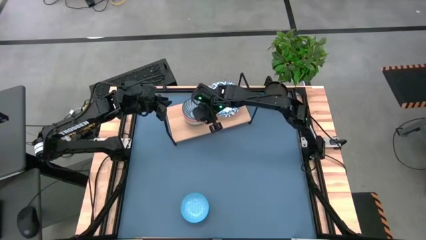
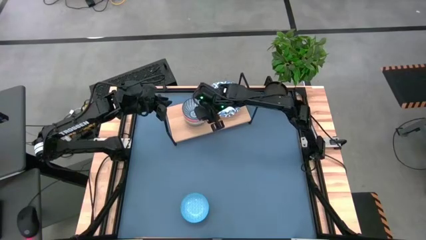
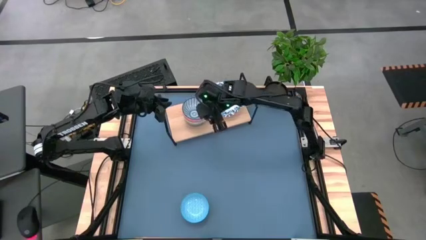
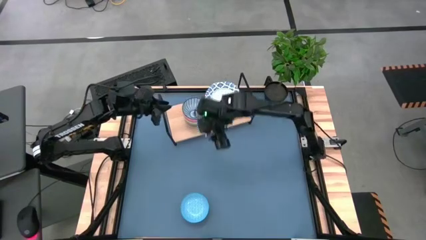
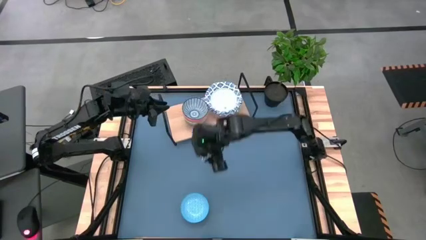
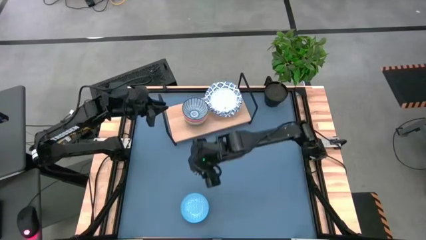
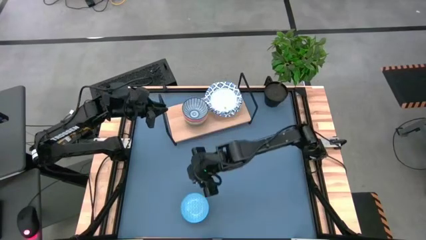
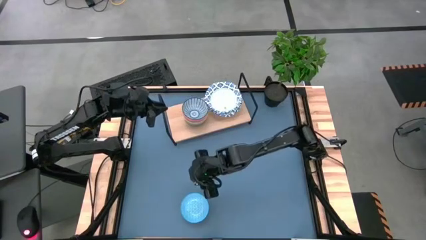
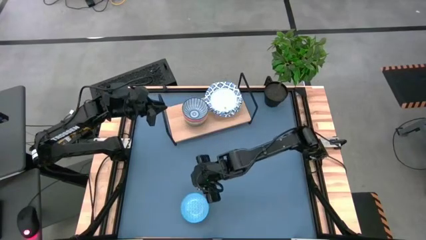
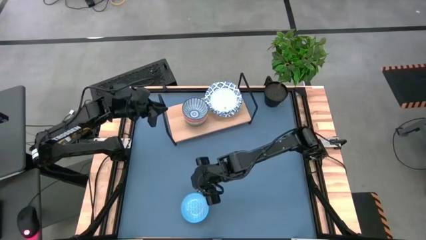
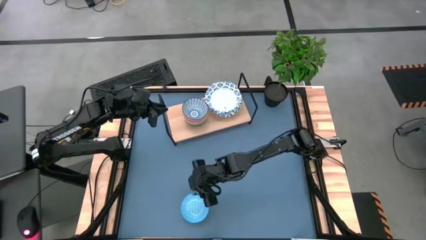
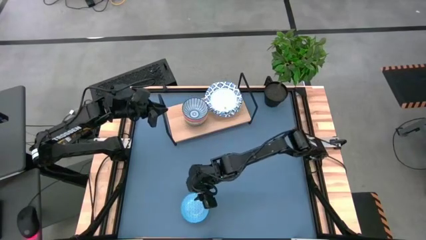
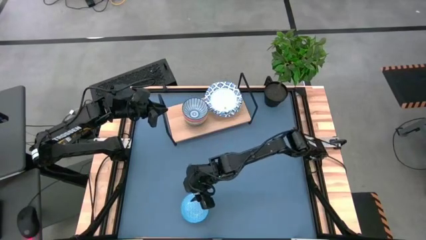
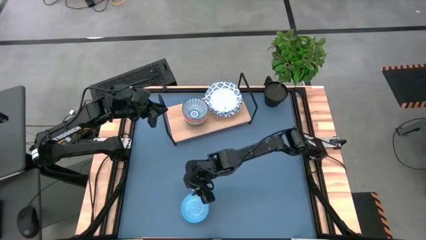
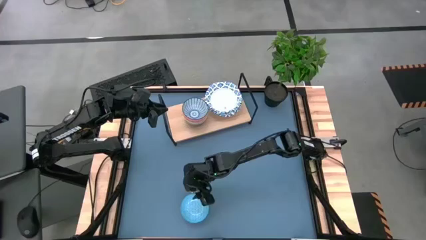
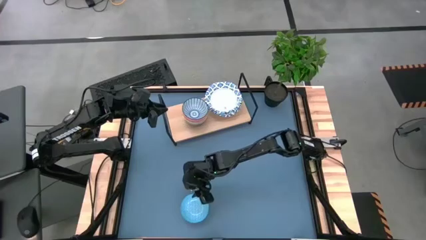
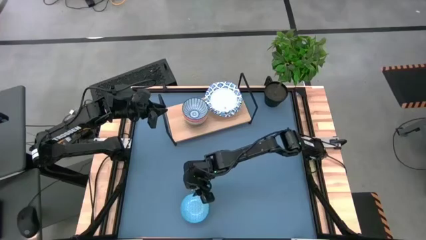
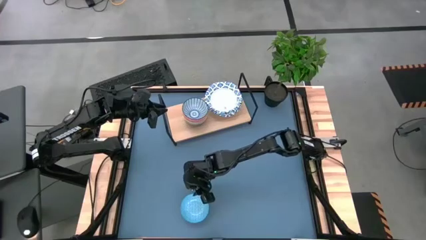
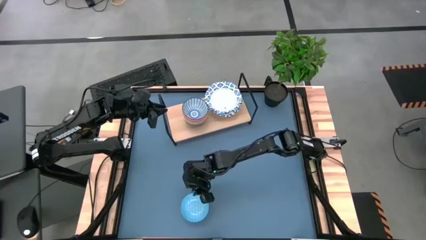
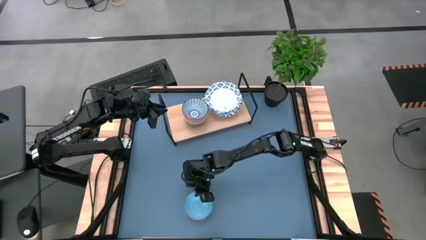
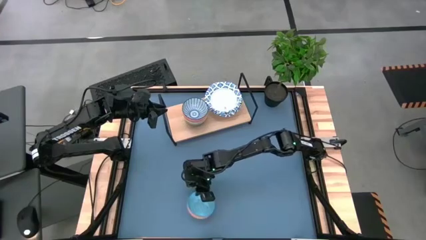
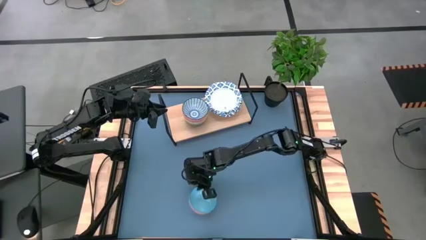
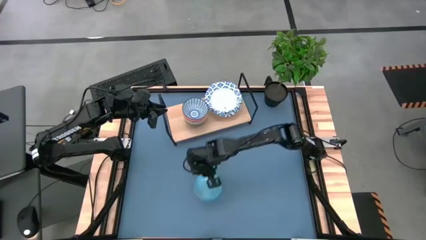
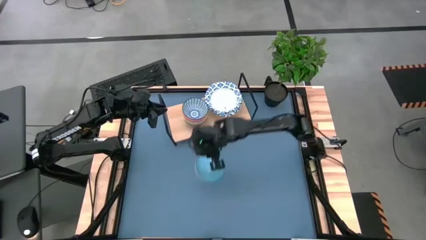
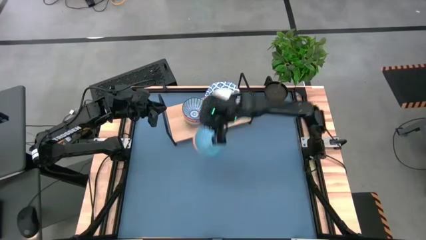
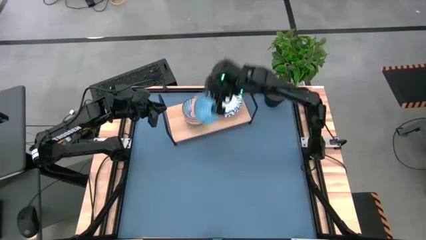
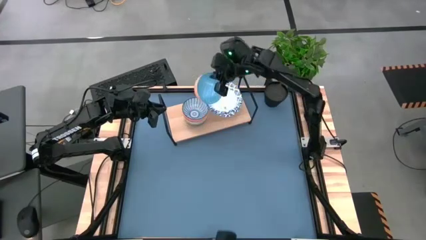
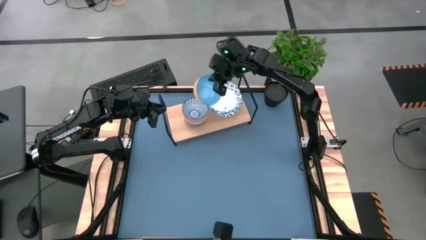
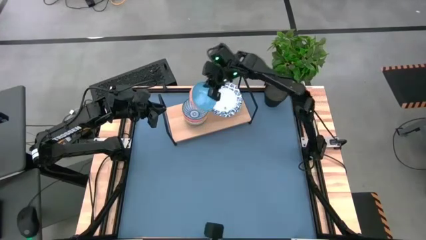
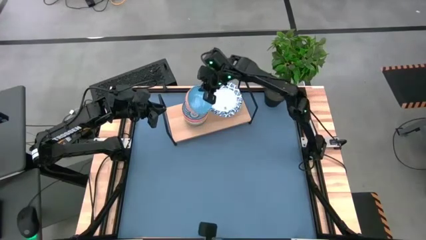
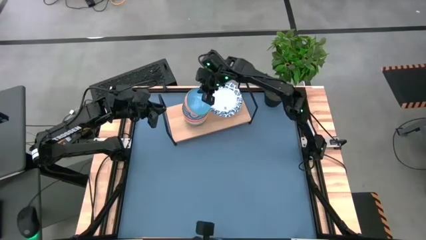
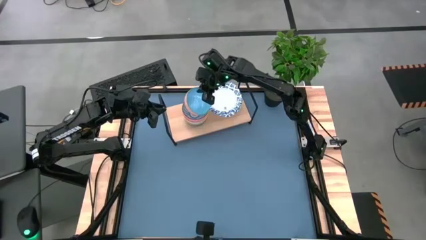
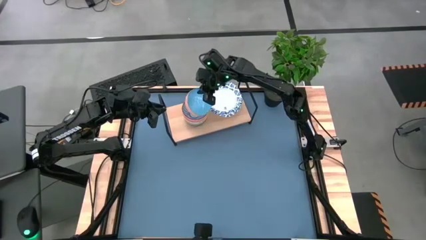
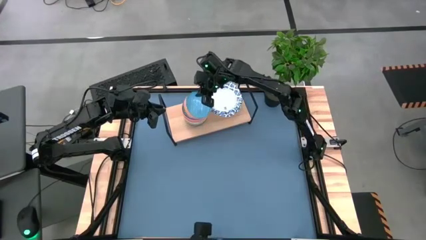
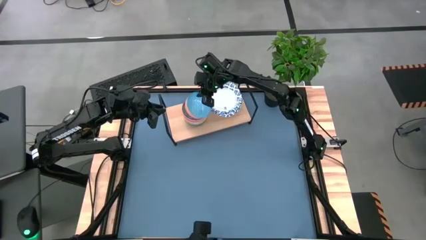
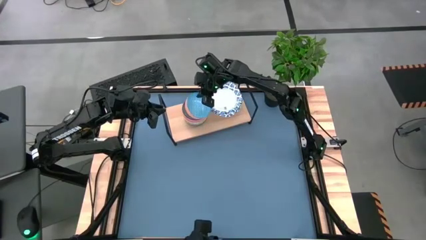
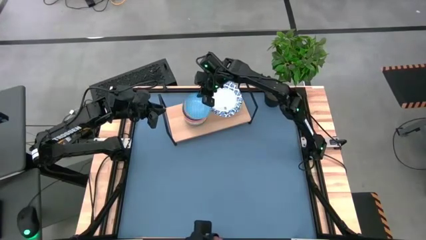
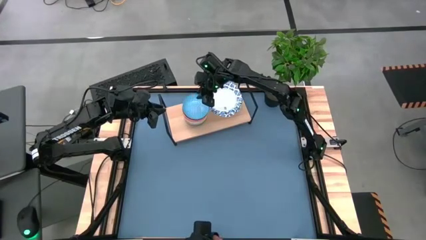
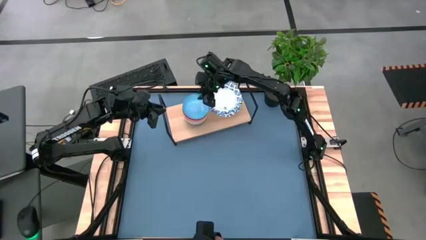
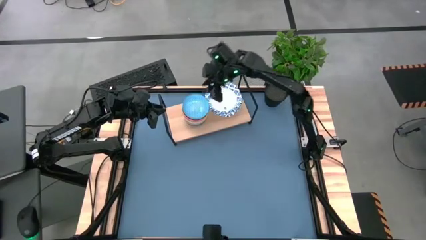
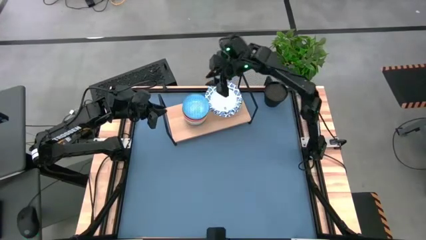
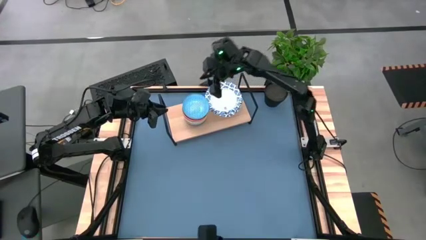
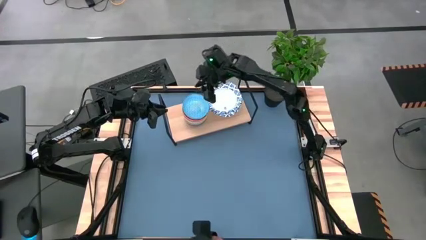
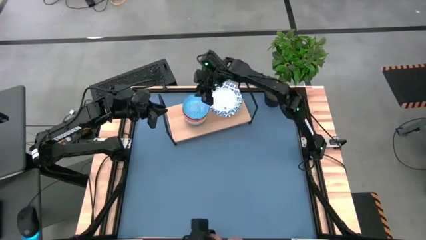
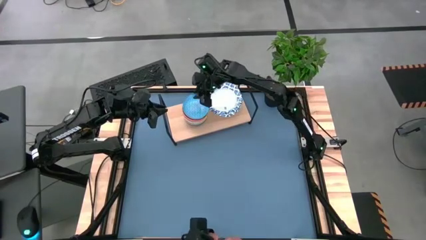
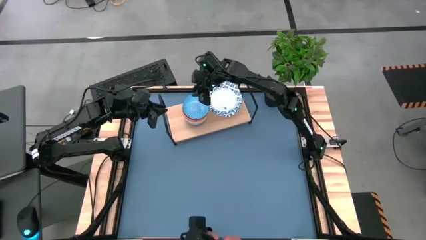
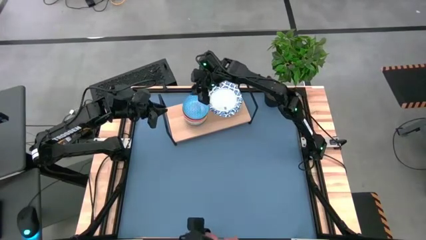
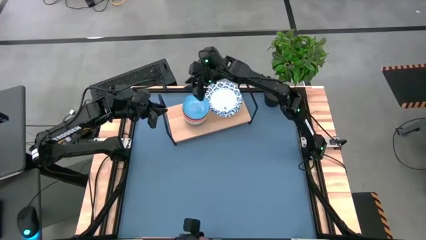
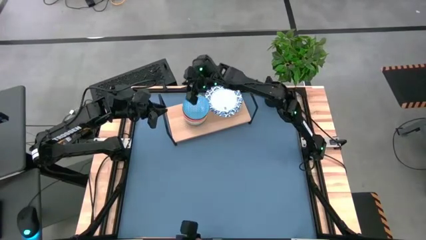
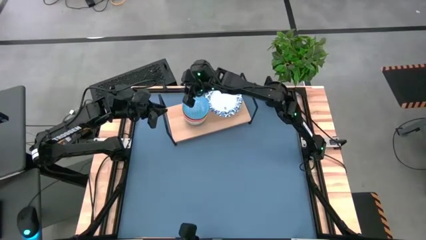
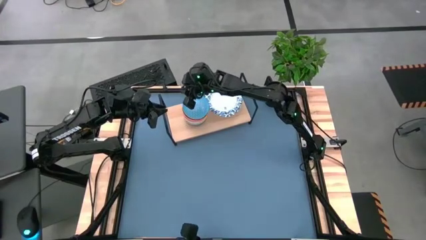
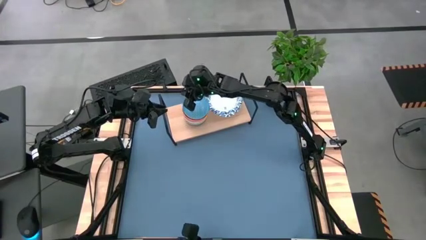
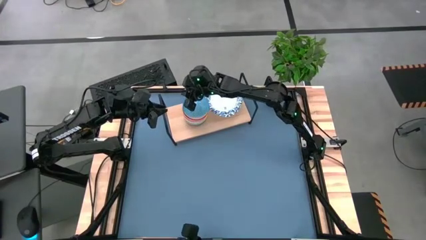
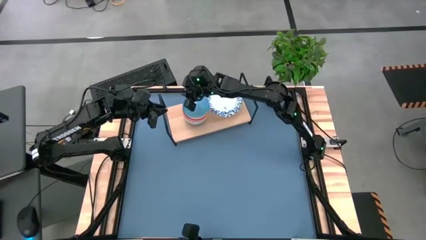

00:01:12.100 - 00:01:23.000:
Task: Place and stack bowls onto a shelf
Stack the light blue patterned bowl on top of the dark blue patterned bowl on the shelf

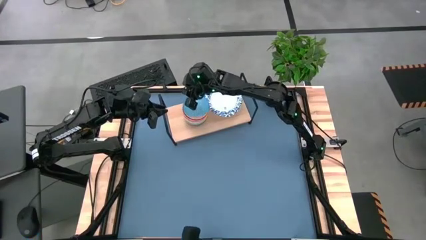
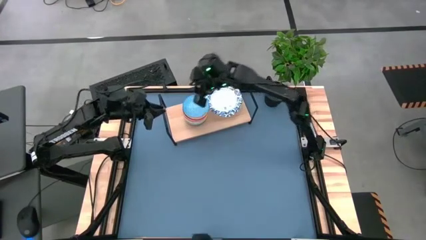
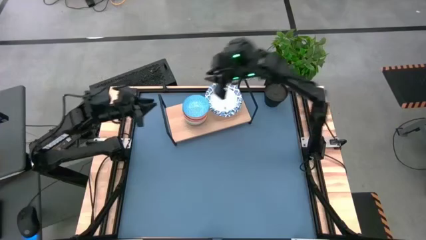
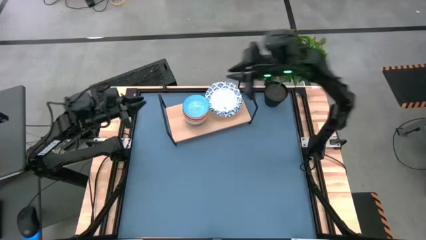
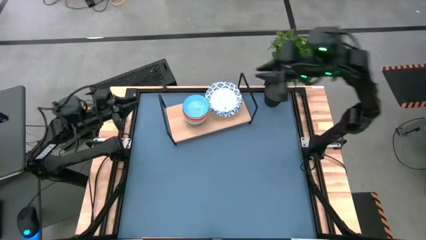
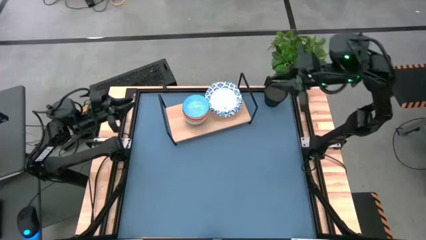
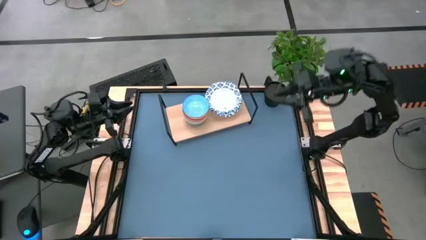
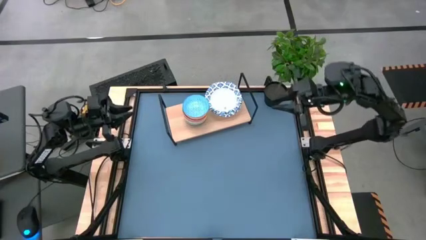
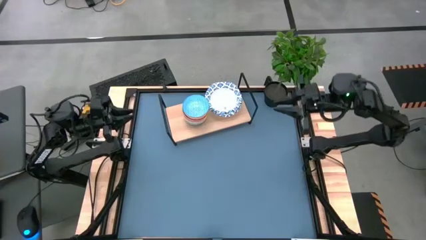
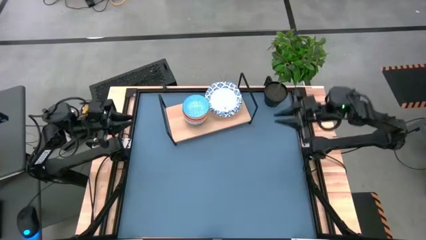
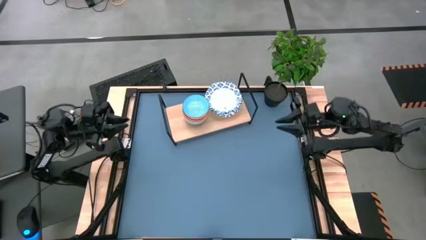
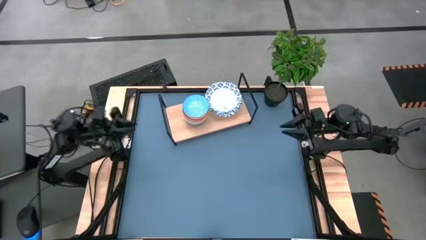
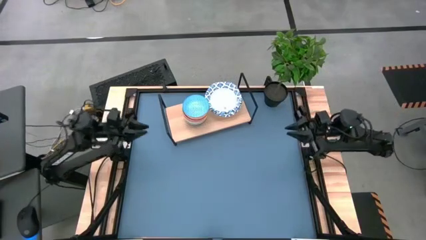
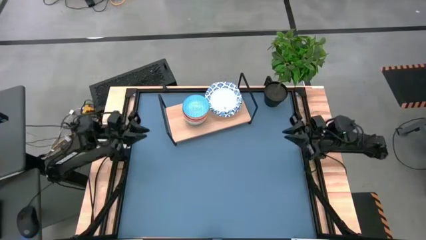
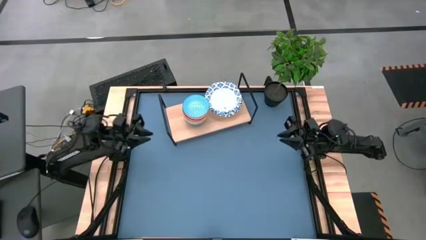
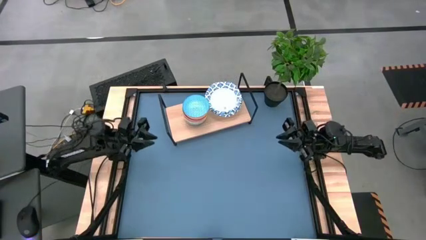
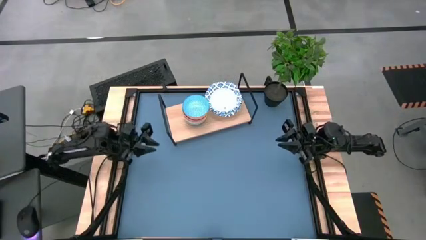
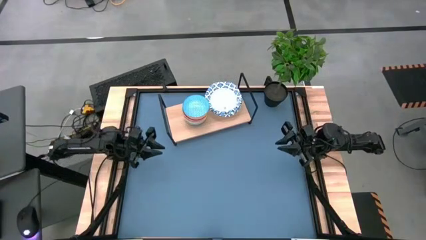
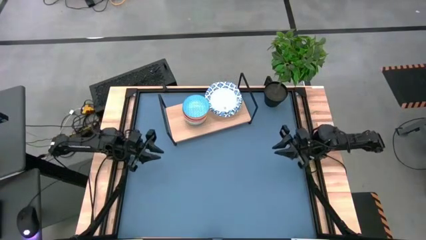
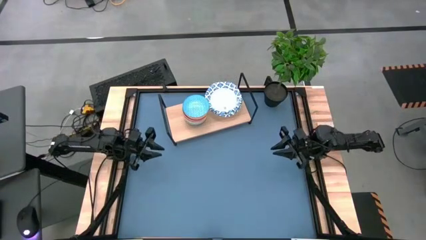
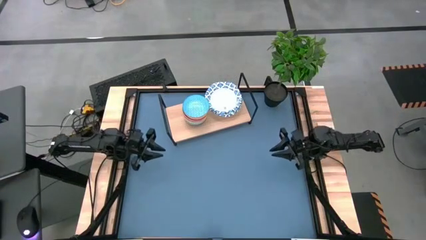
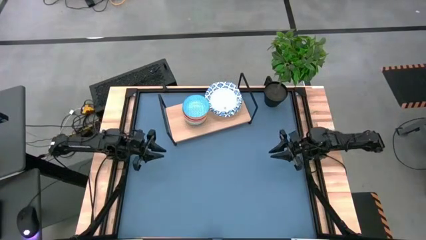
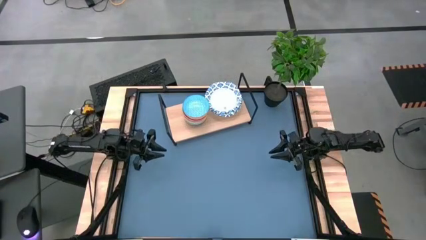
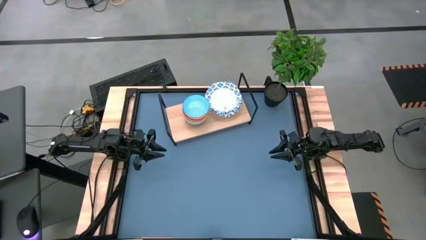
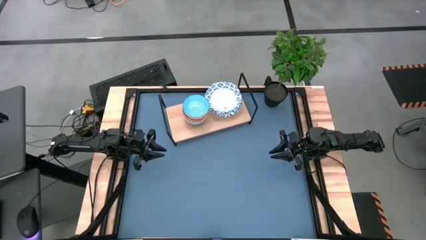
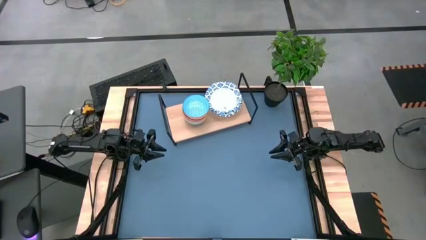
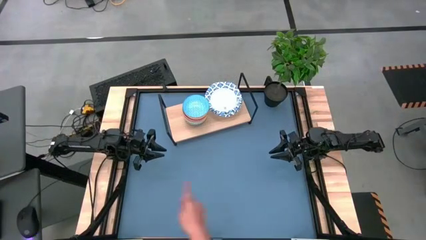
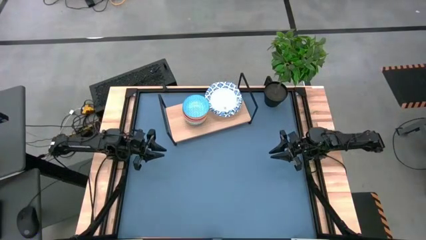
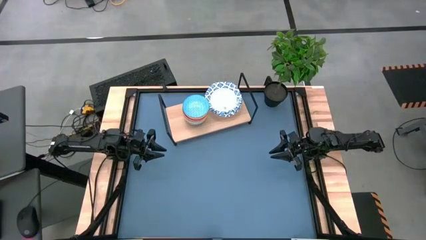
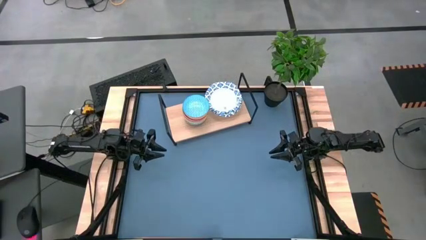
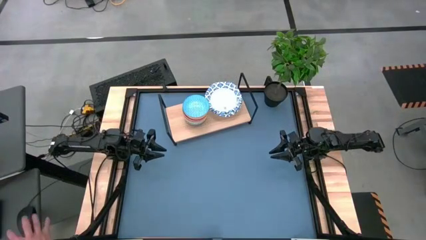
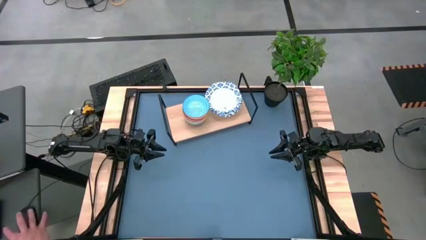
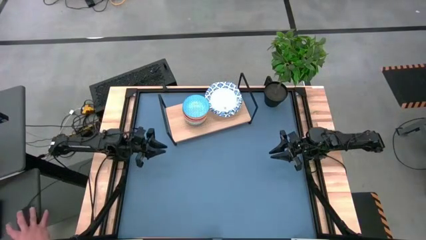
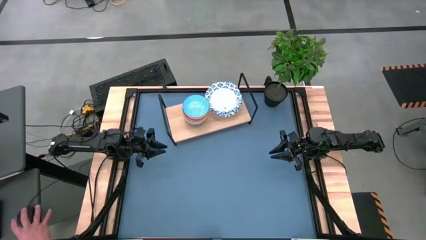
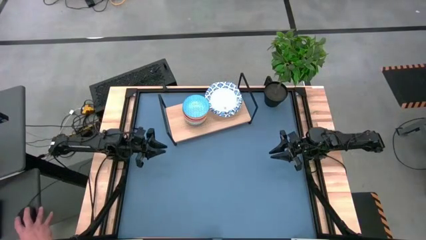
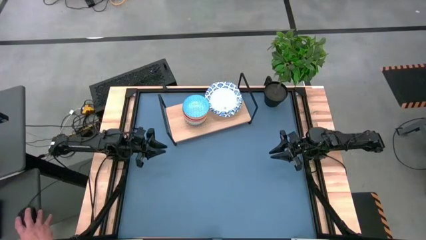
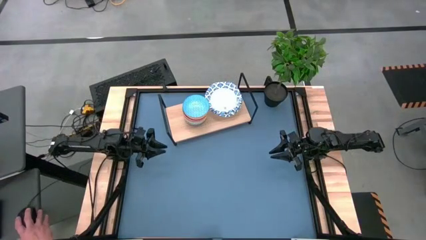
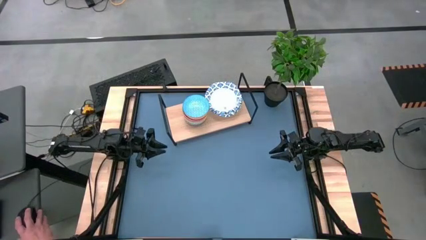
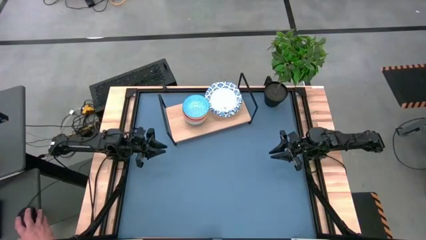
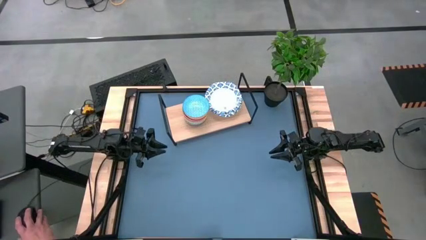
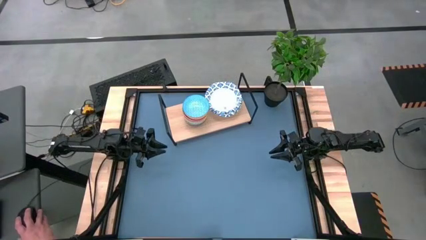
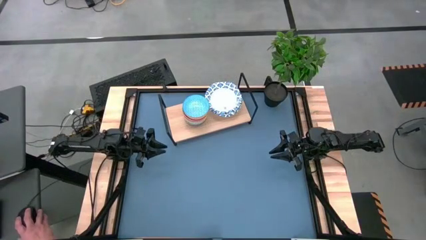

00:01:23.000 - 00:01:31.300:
Return to Home Position
